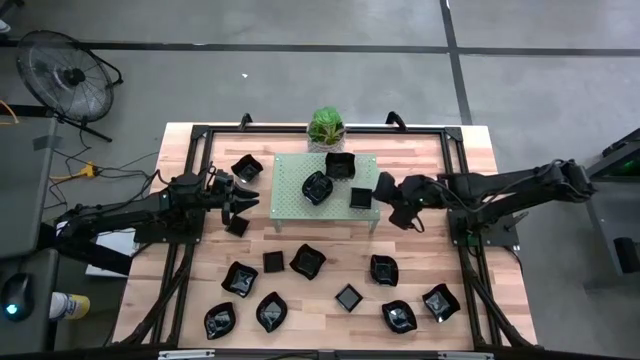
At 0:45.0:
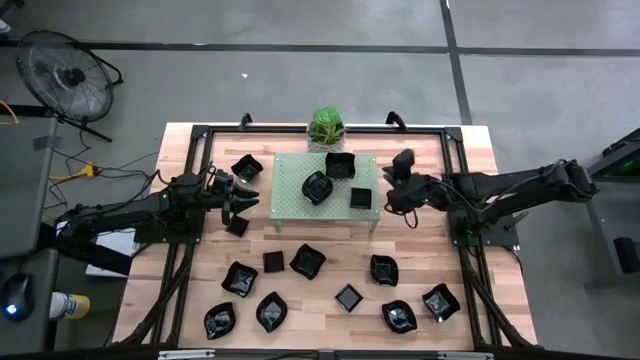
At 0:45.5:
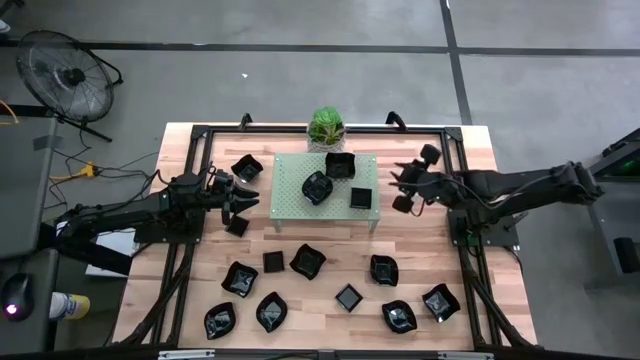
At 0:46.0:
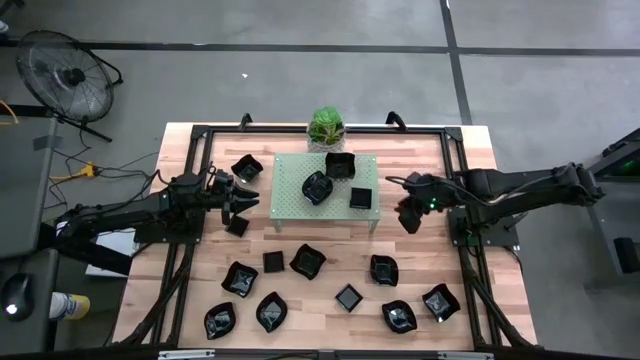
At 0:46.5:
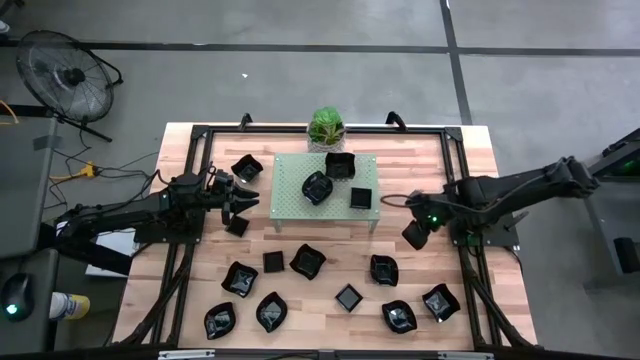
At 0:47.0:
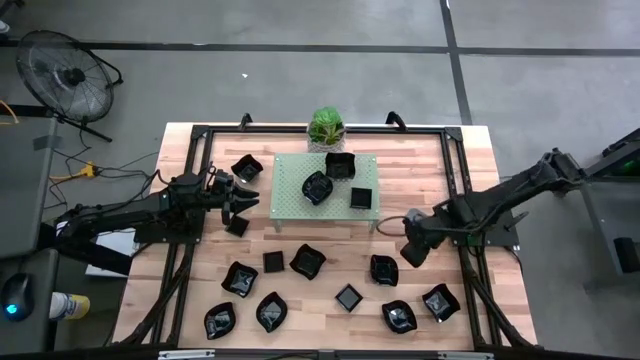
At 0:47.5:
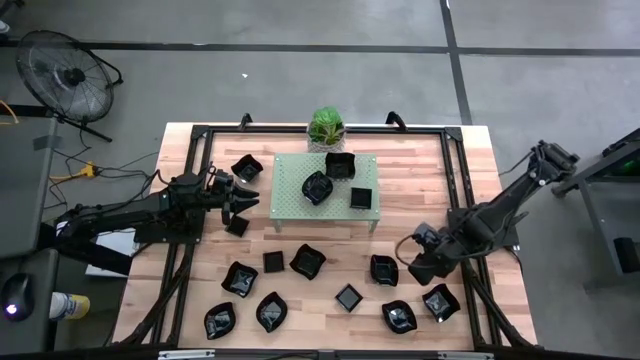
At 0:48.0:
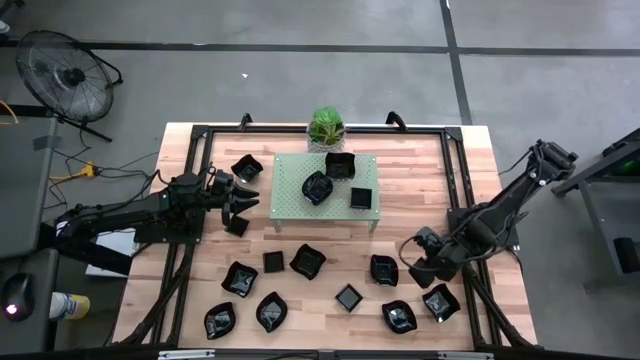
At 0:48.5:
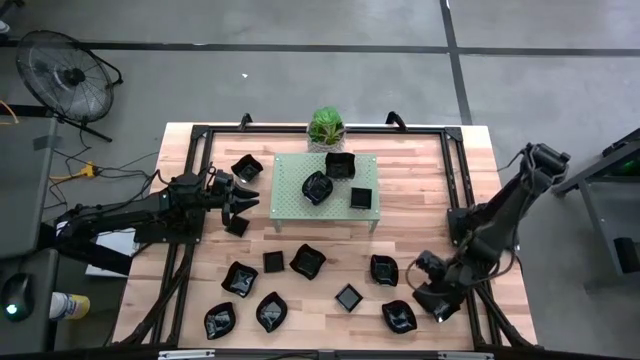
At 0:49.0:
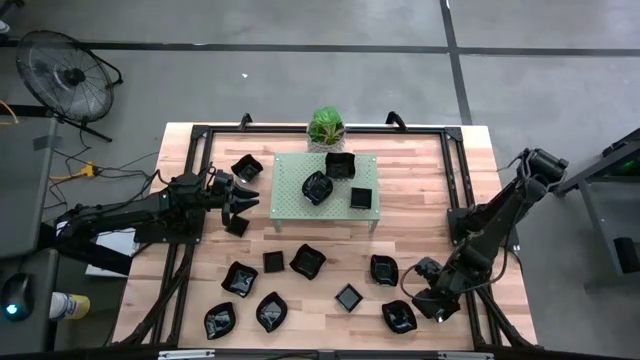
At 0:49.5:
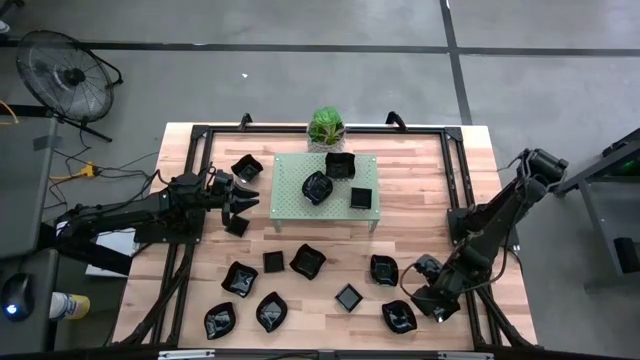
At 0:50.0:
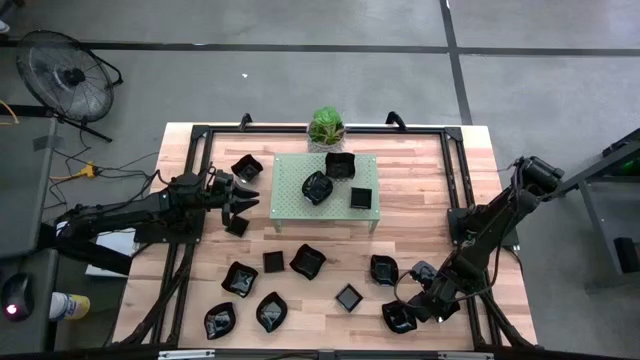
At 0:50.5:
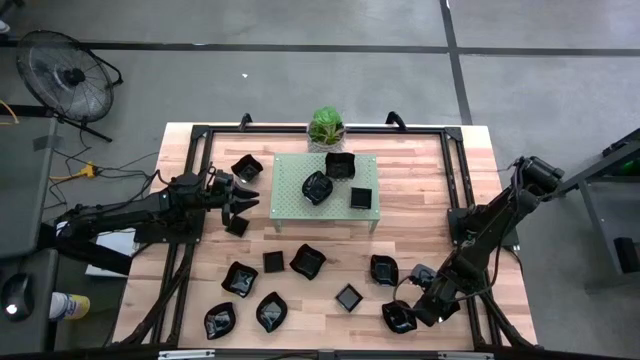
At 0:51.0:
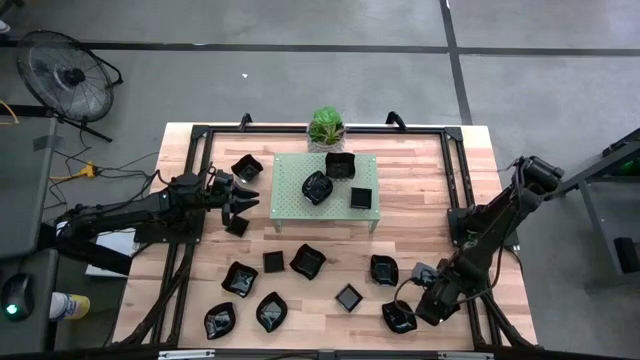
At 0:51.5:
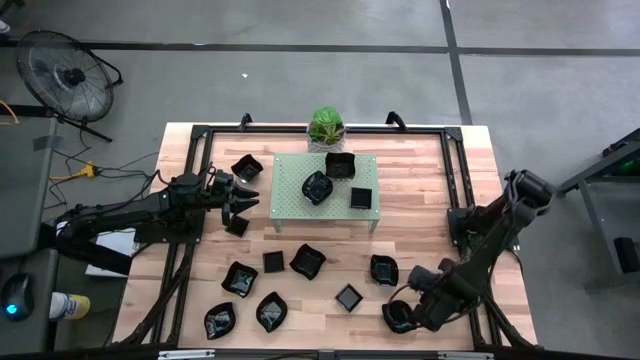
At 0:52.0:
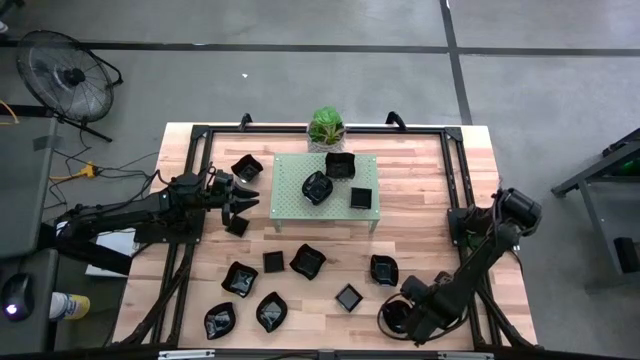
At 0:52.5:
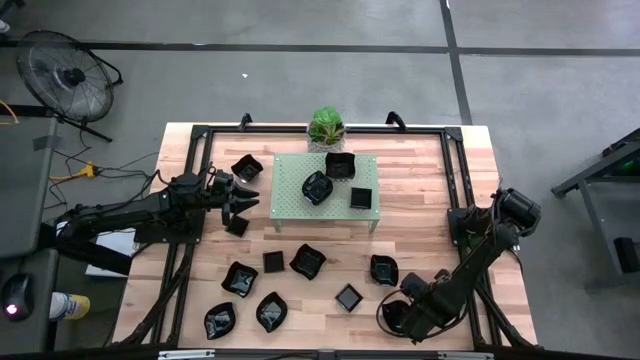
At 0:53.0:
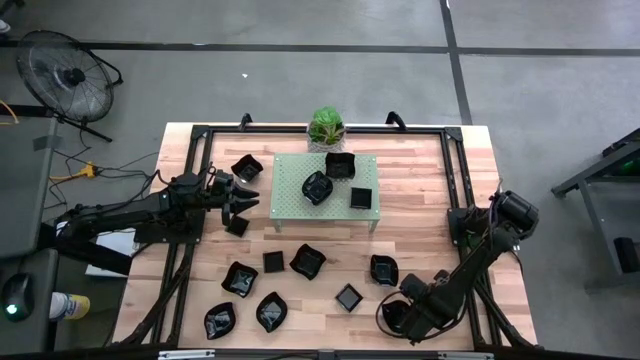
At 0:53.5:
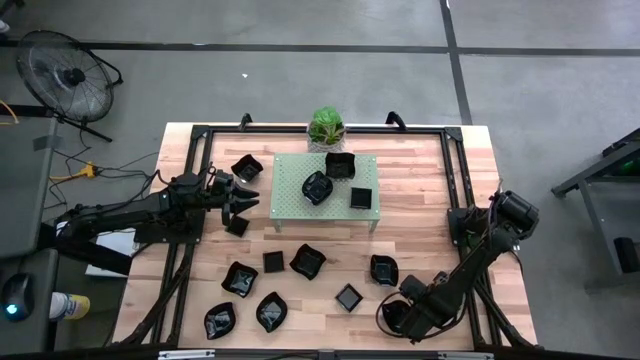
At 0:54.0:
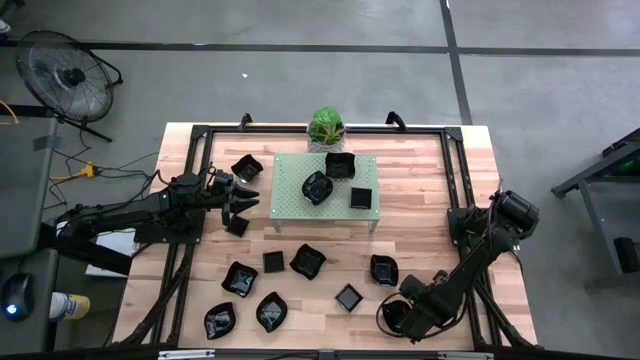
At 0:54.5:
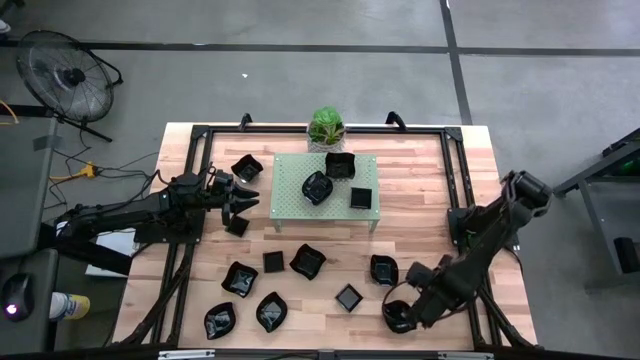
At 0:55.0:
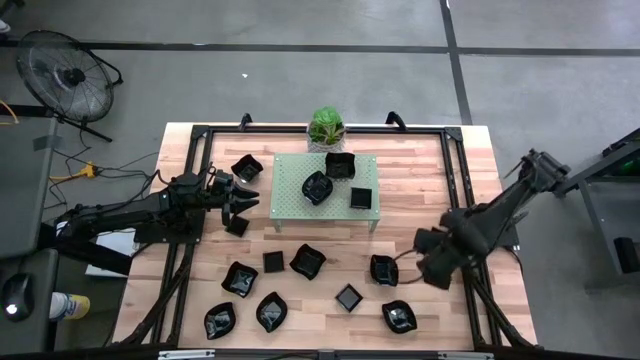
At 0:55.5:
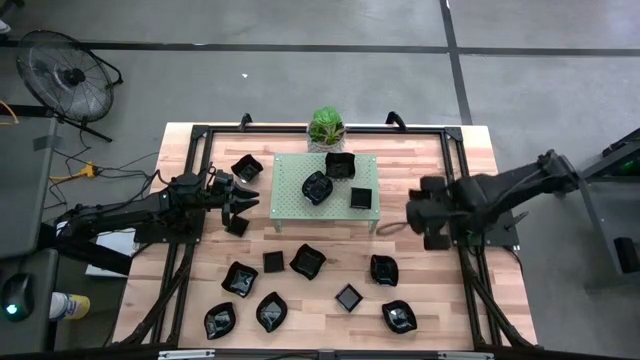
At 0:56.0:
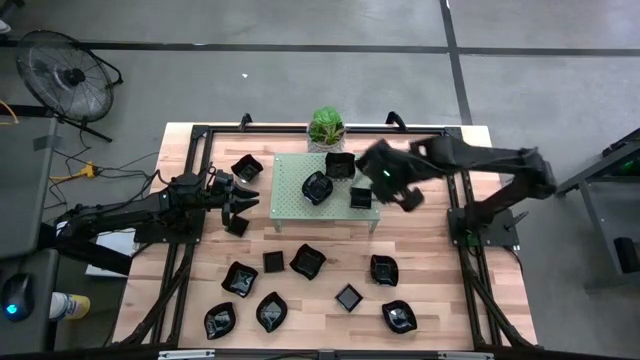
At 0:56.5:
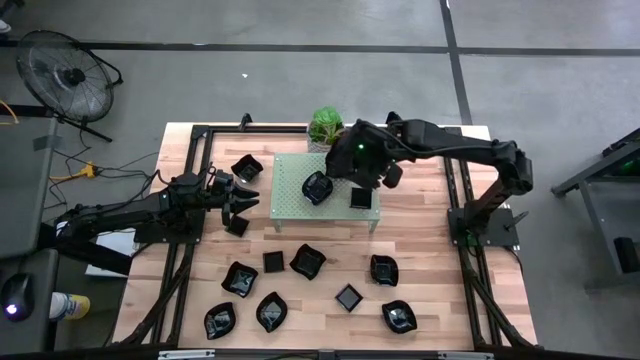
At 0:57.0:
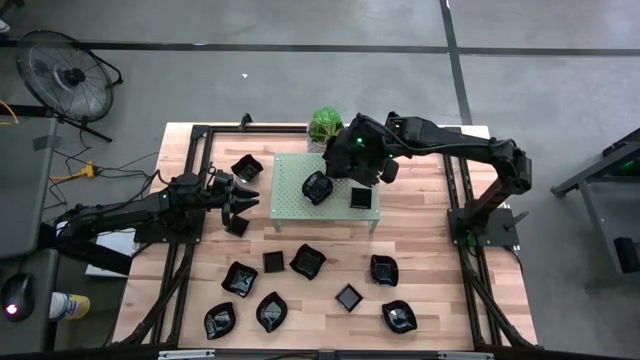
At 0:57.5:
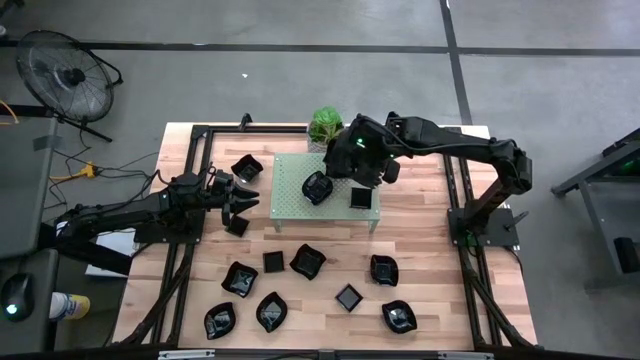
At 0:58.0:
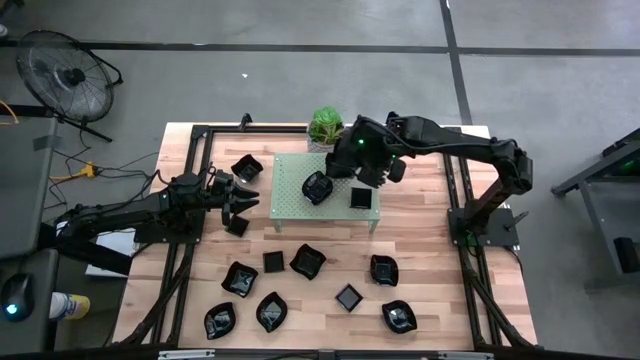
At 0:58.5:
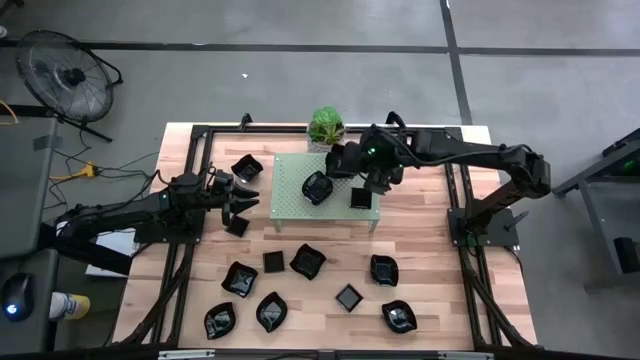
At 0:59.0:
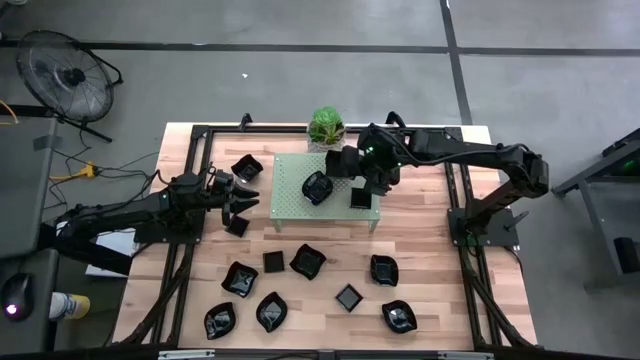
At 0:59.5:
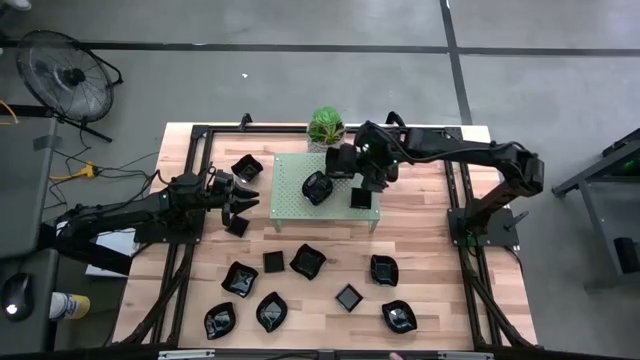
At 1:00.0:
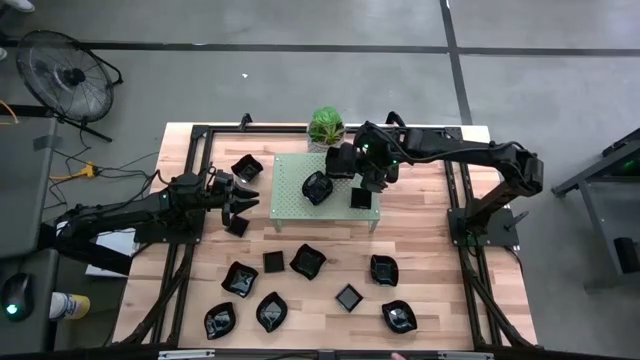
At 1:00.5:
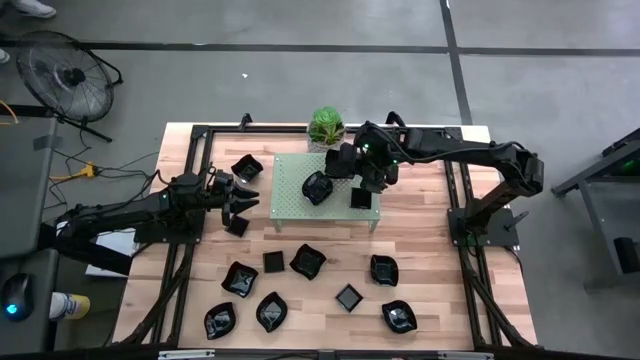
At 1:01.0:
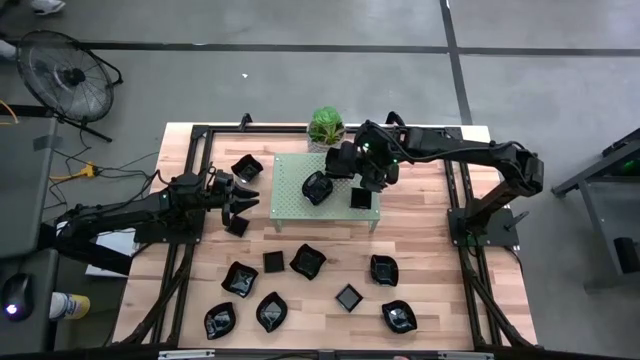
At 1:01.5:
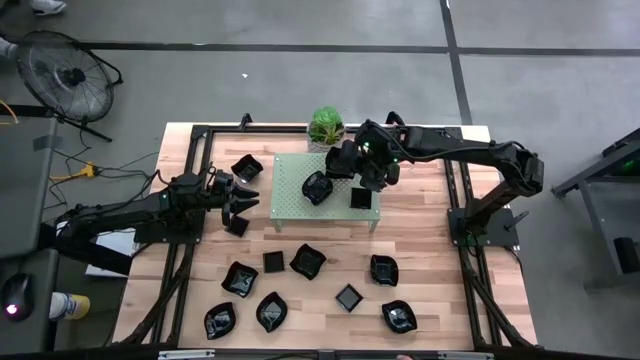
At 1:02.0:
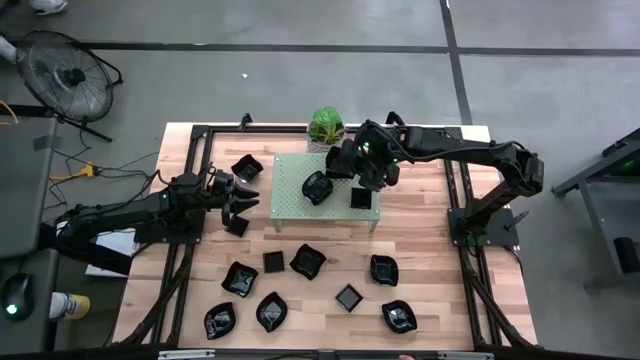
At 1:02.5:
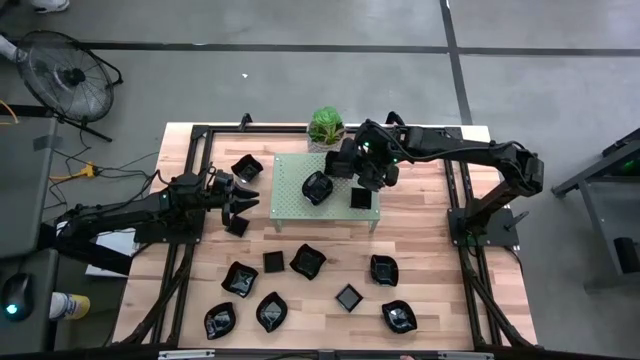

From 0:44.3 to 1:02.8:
Task: Pick & Place Mini shaped plates
Stack the black square plate on the other black square plate on the shelf

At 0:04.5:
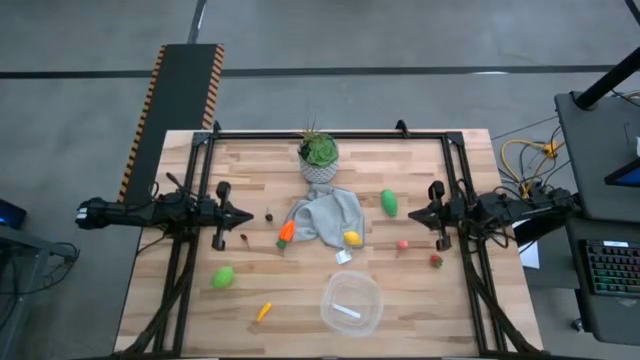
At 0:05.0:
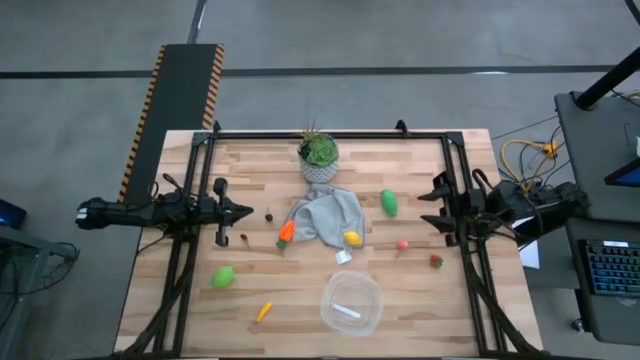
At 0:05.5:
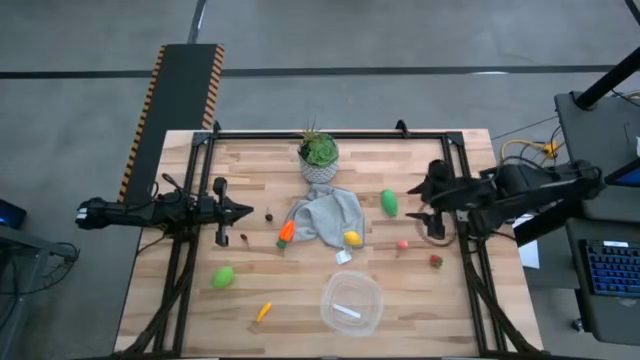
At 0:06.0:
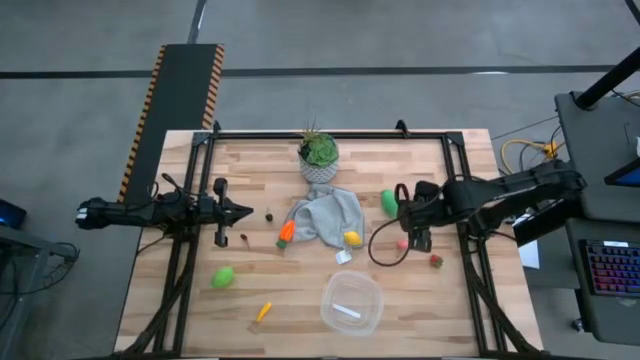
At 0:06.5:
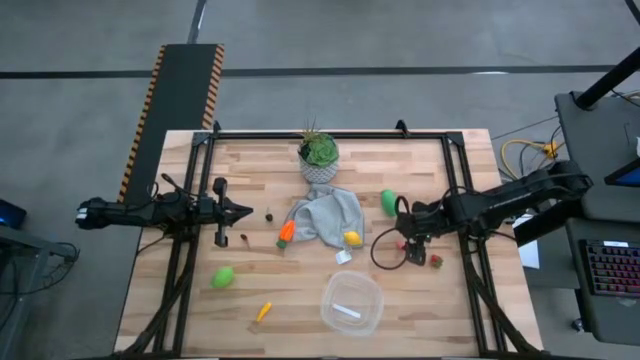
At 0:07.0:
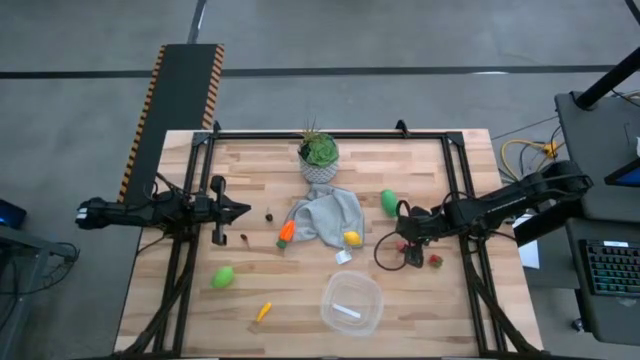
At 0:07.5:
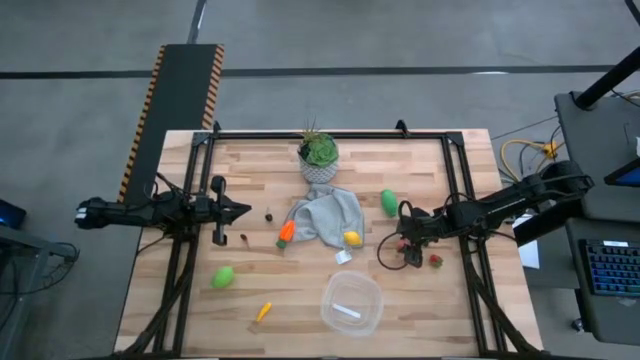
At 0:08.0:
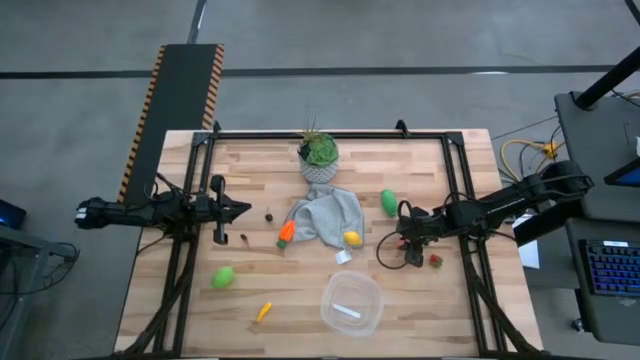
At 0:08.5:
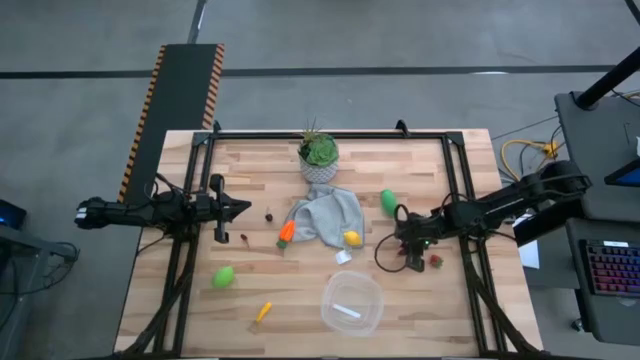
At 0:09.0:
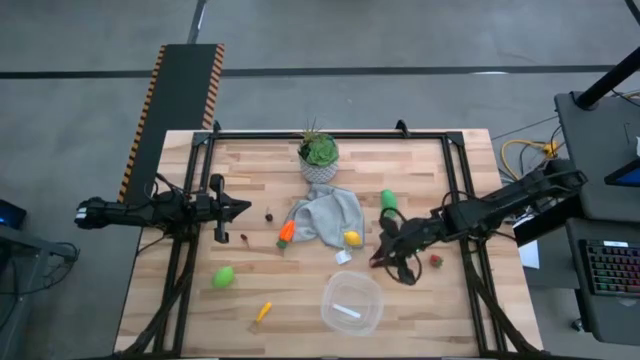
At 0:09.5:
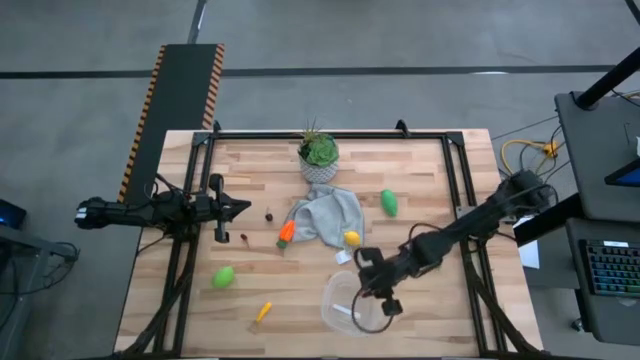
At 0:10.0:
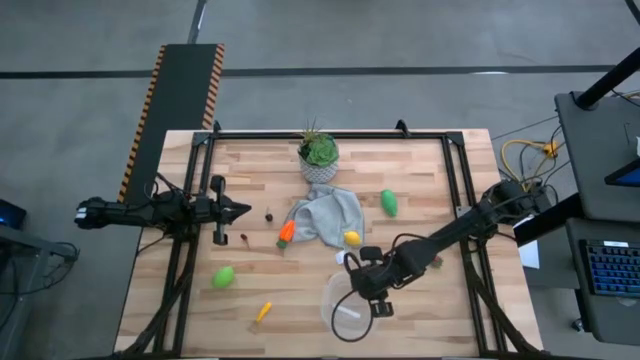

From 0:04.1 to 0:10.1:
Task: Pick and placing Produce into tupperware
Put the peach into the transparent bin
